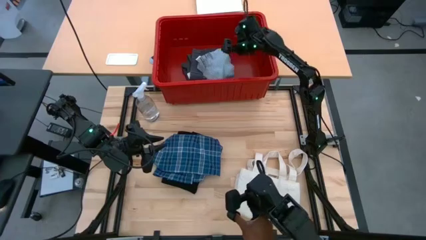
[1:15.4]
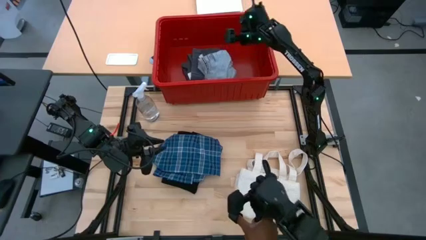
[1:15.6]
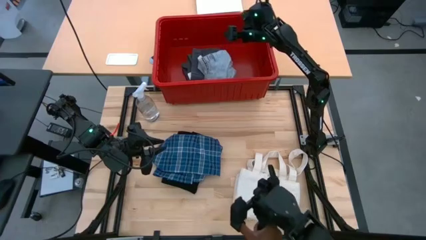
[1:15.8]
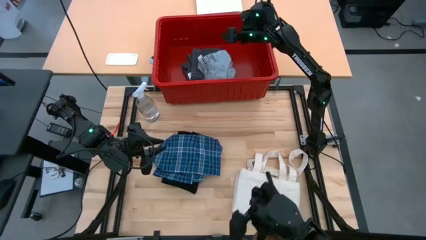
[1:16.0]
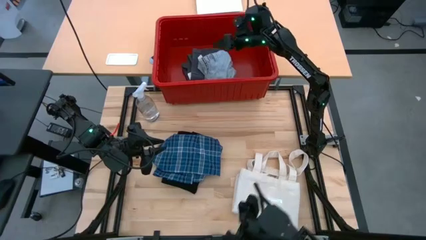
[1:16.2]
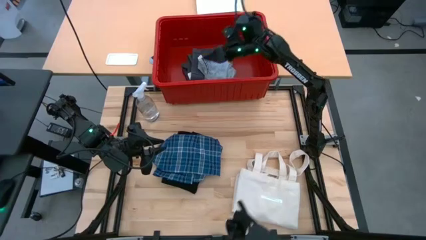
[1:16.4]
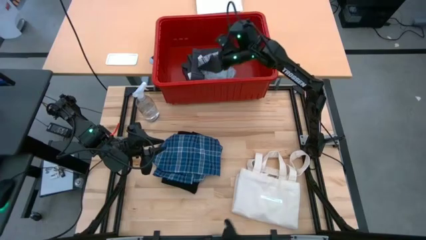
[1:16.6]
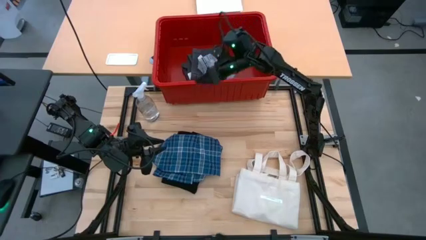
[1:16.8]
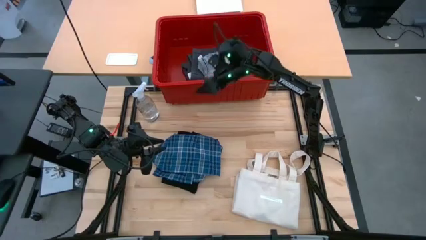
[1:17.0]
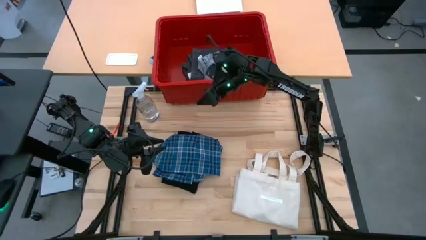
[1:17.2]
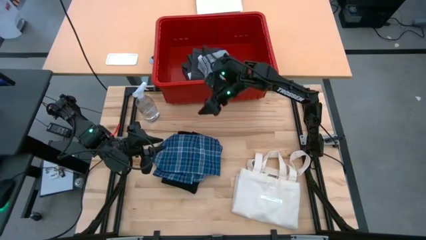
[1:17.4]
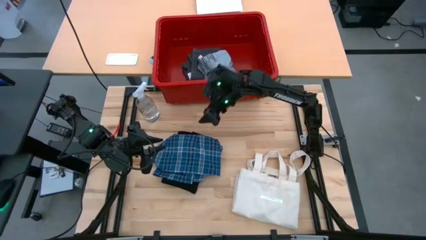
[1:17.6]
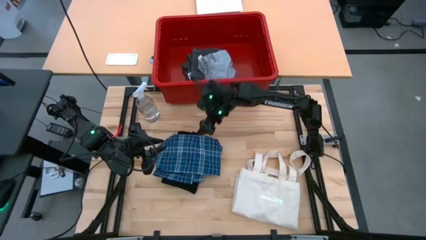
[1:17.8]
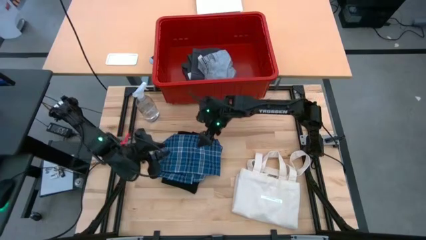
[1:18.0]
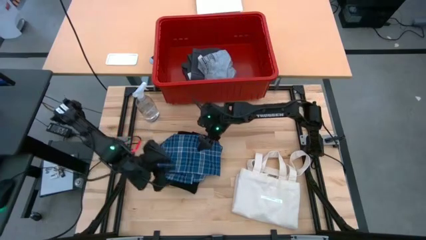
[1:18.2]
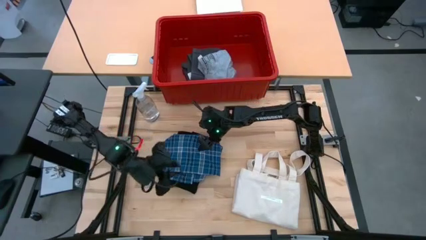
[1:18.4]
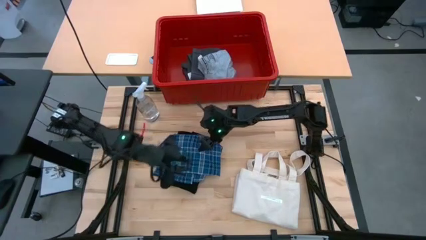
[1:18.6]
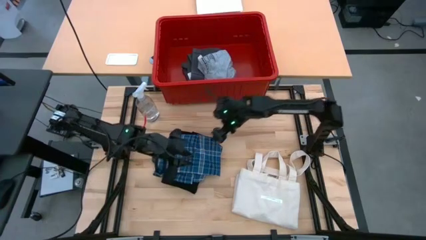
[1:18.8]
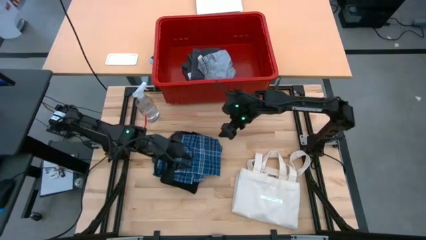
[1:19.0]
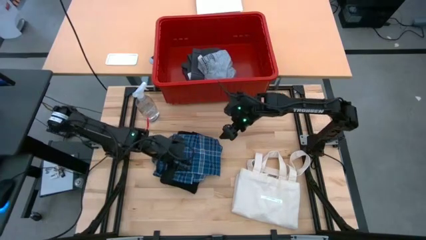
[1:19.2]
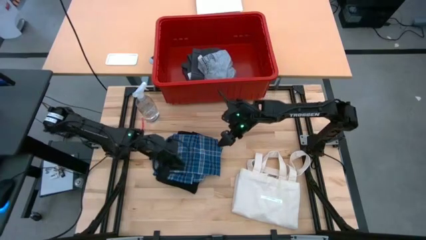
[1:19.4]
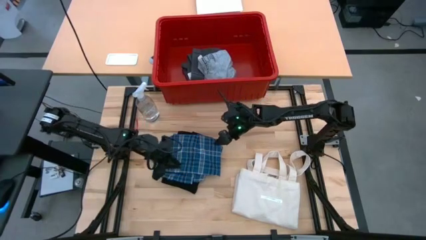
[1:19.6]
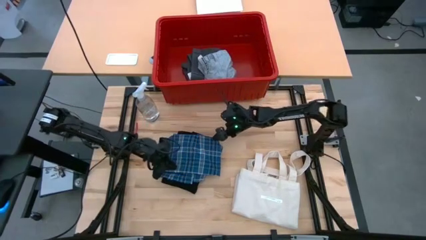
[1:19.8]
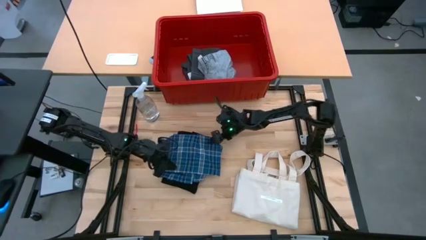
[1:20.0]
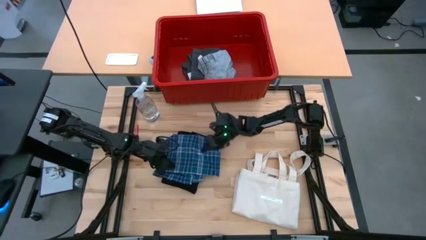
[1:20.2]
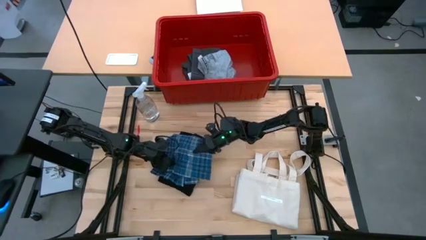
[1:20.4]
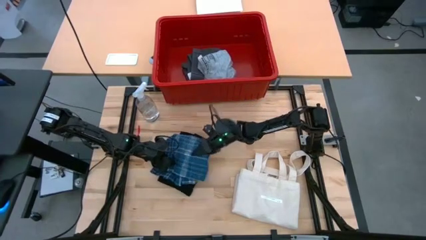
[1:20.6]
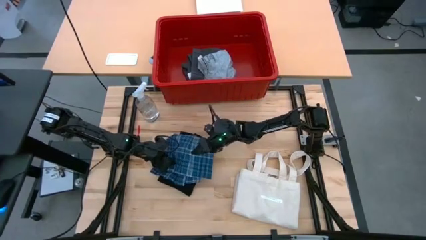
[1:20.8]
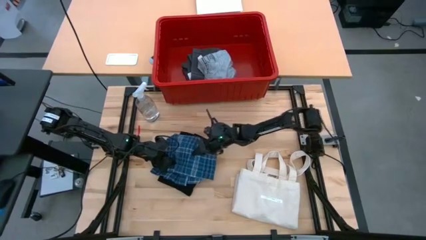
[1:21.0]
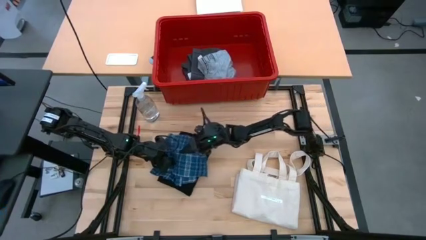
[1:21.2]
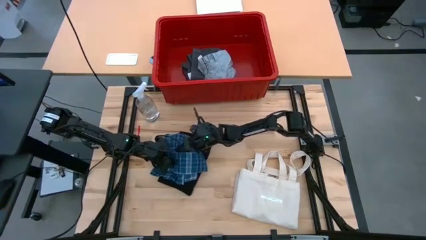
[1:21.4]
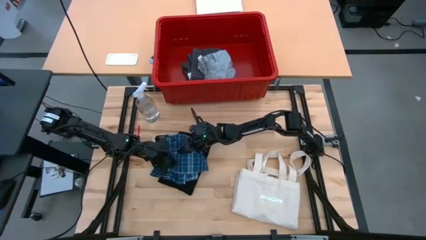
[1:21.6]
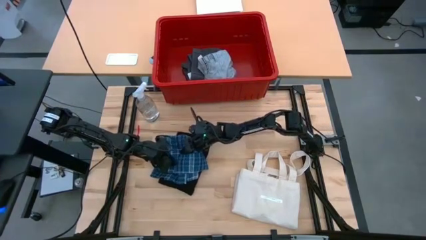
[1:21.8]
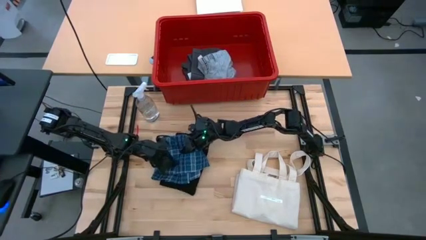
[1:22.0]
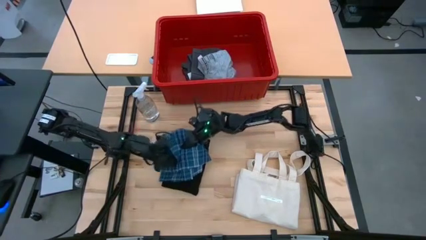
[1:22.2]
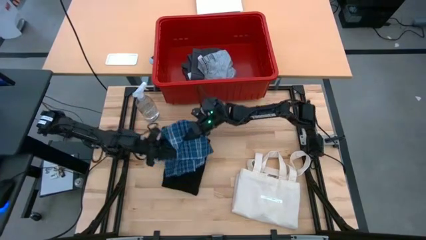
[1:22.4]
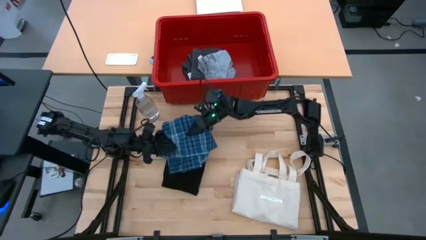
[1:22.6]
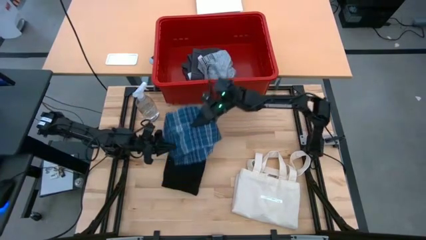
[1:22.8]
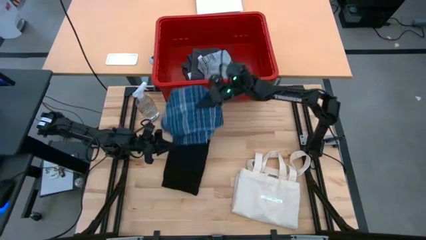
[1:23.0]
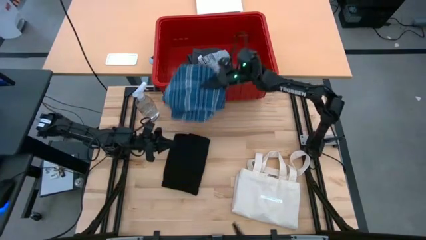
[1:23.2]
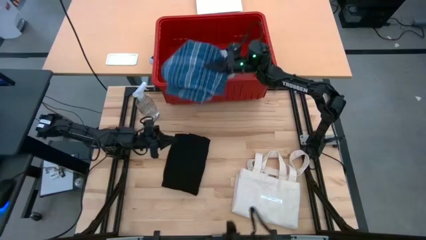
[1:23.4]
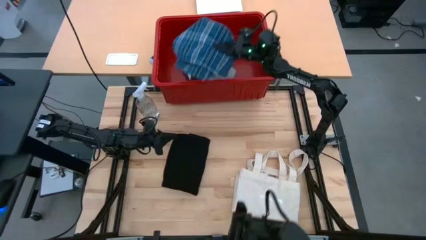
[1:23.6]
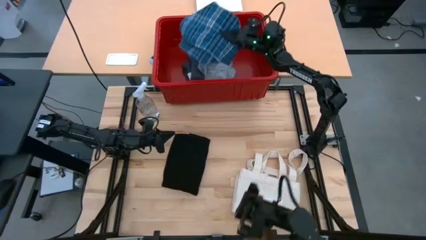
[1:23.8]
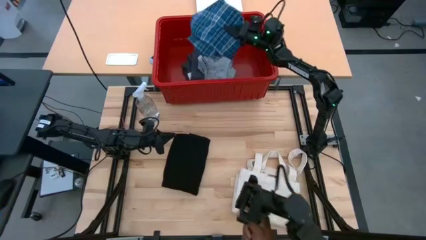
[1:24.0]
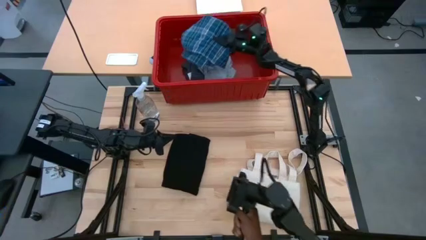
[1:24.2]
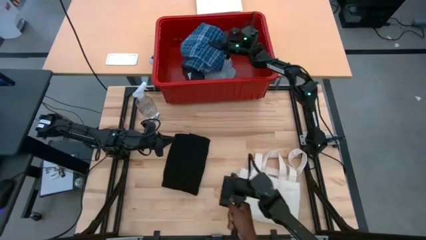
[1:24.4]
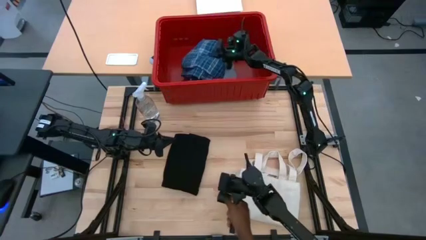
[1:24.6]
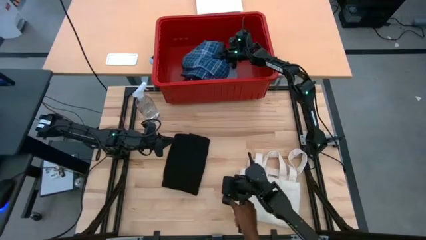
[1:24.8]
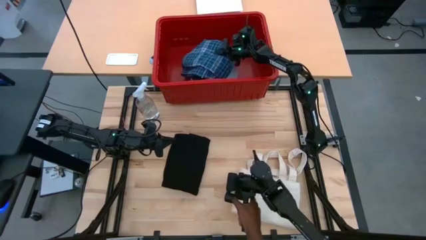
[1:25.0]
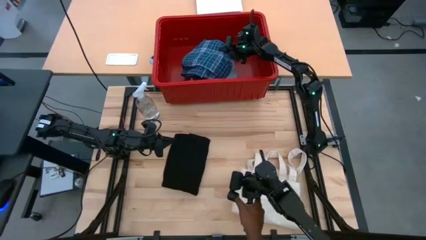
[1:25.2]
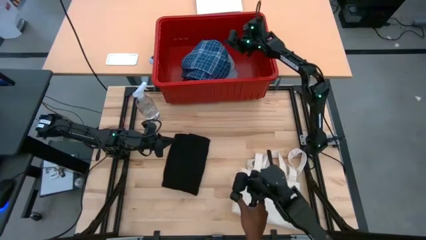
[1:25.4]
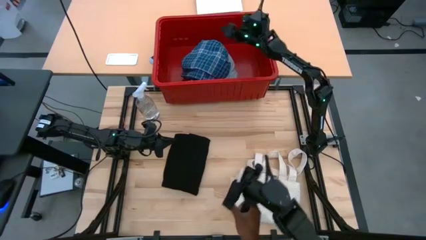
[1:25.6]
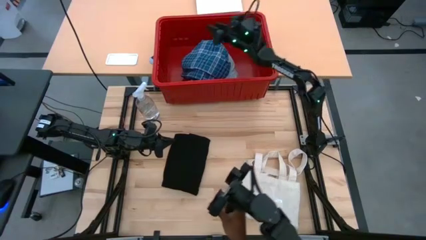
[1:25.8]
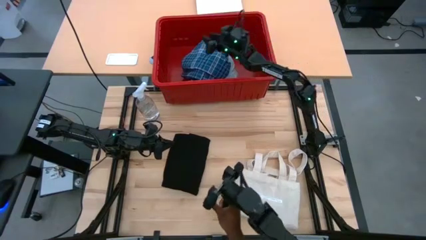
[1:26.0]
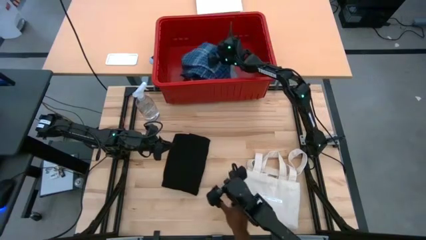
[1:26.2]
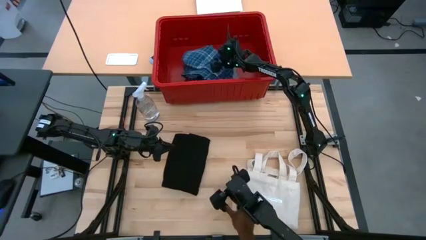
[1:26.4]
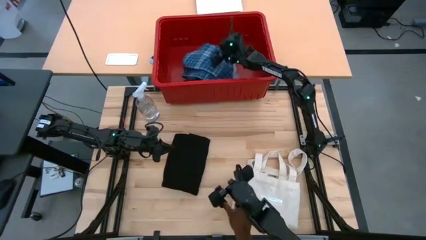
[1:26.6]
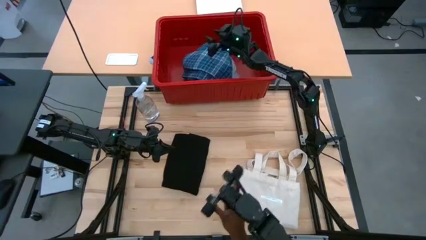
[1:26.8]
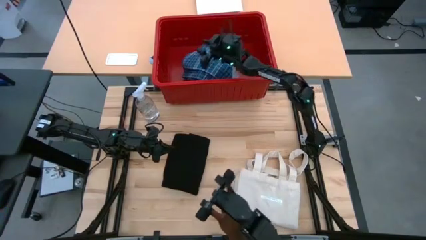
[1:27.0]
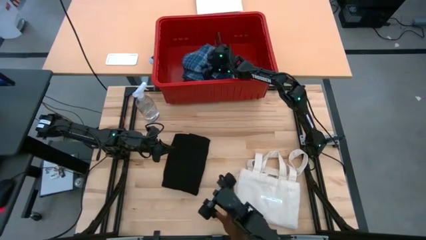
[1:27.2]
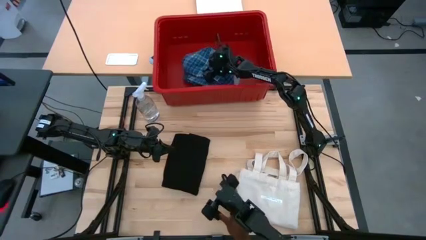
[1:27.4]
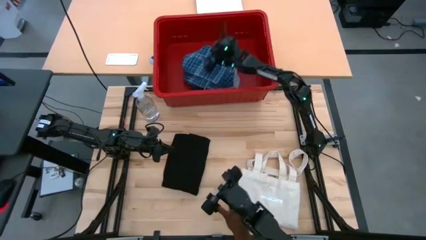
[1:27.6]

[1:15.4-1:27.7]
Task: Fold laundry
Put the blue checkered shirt into the red bin

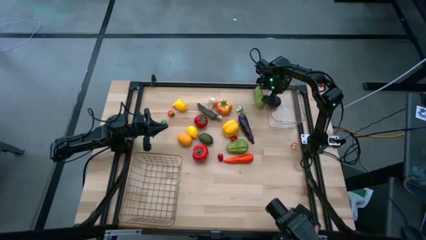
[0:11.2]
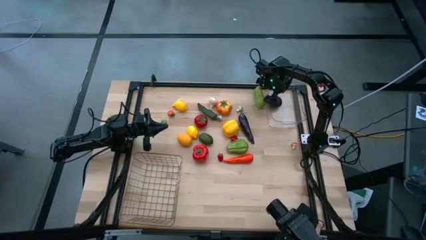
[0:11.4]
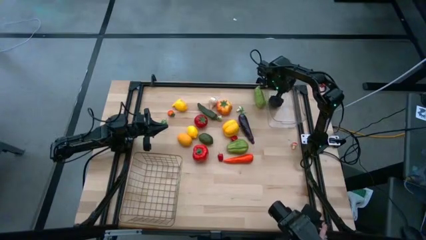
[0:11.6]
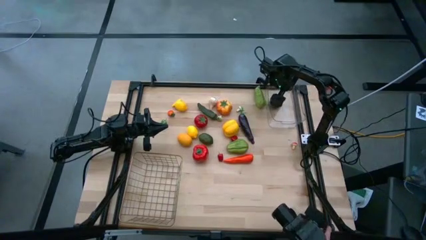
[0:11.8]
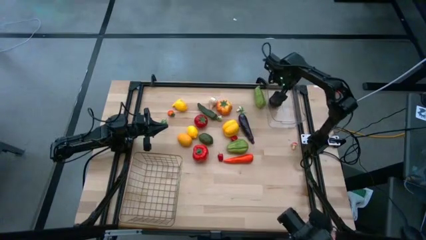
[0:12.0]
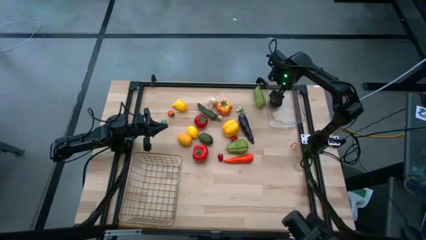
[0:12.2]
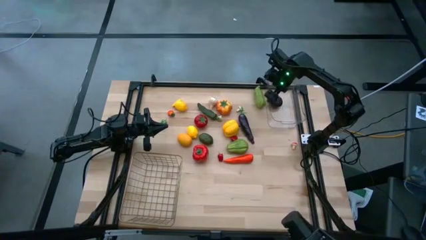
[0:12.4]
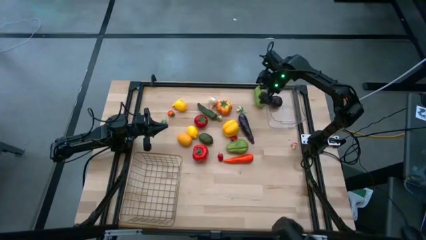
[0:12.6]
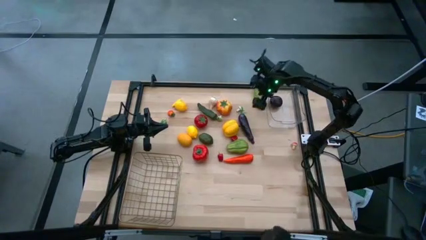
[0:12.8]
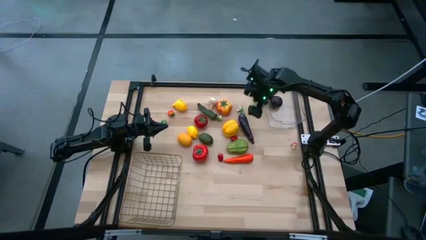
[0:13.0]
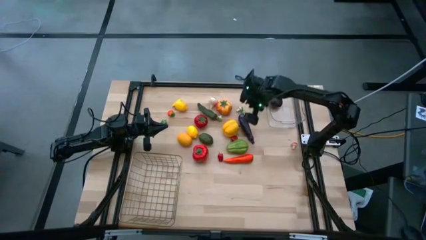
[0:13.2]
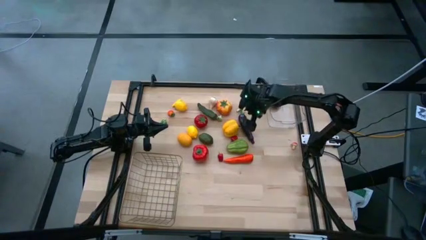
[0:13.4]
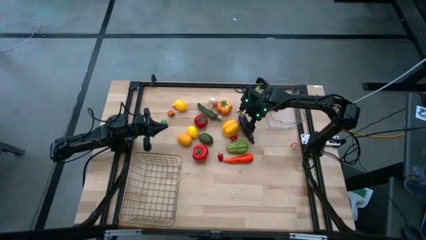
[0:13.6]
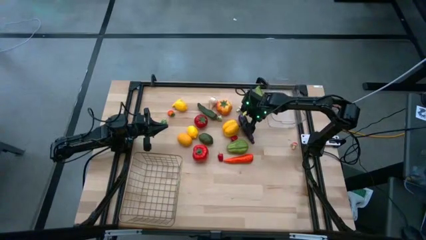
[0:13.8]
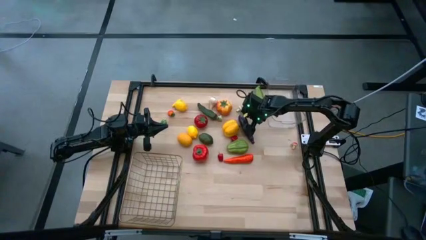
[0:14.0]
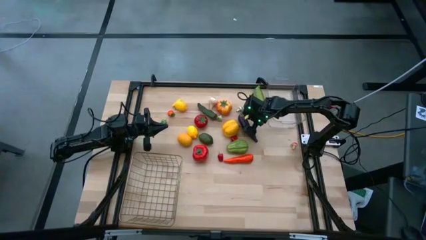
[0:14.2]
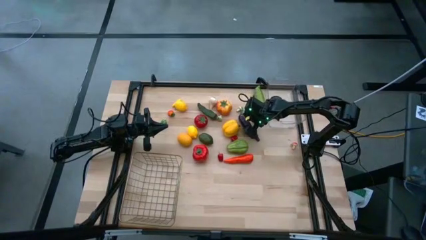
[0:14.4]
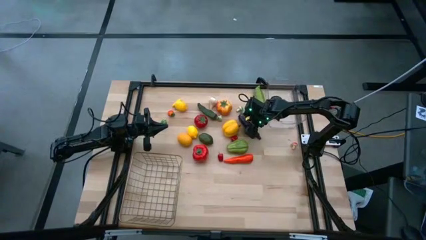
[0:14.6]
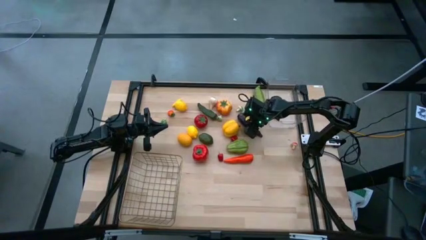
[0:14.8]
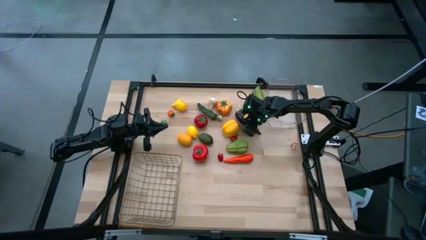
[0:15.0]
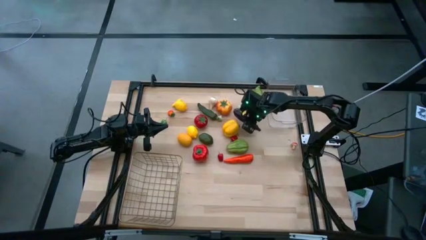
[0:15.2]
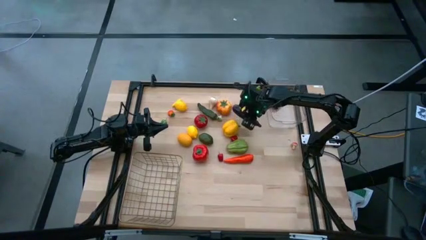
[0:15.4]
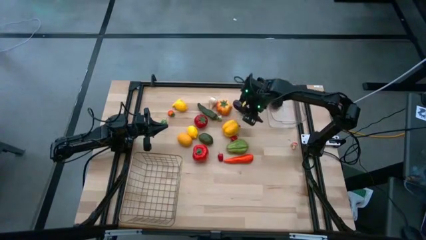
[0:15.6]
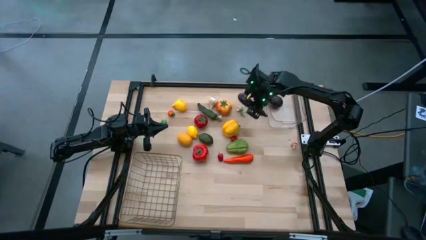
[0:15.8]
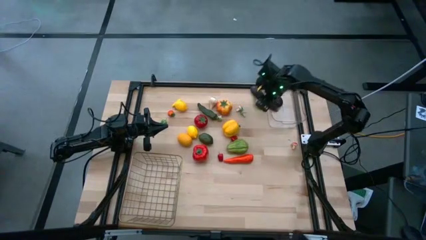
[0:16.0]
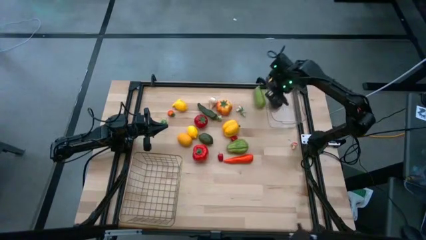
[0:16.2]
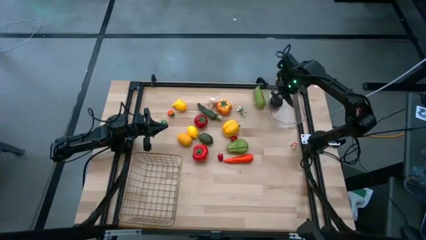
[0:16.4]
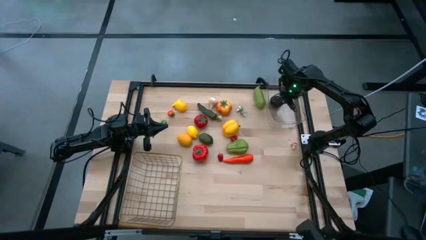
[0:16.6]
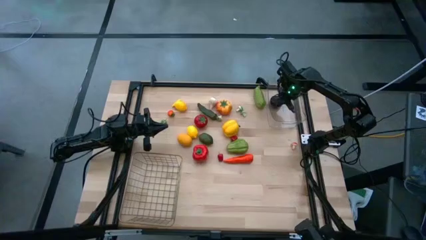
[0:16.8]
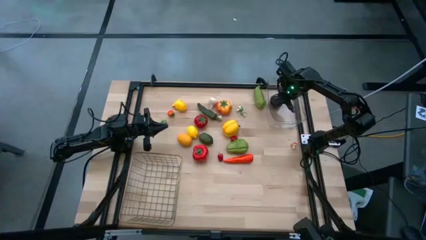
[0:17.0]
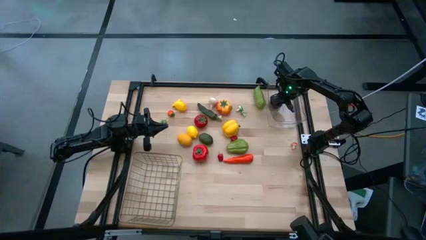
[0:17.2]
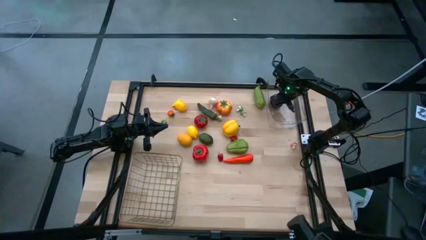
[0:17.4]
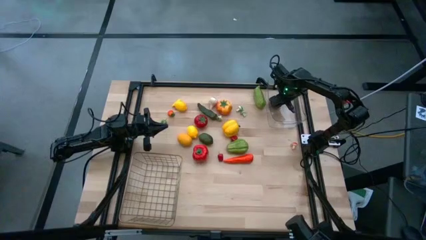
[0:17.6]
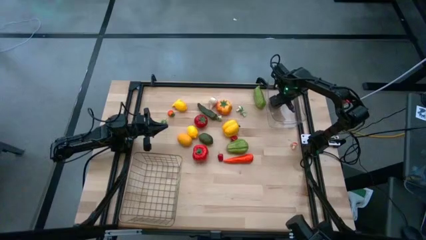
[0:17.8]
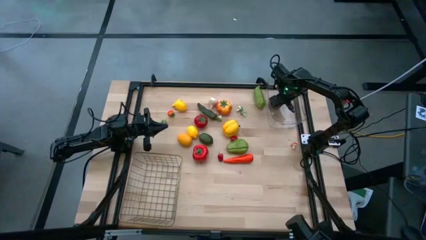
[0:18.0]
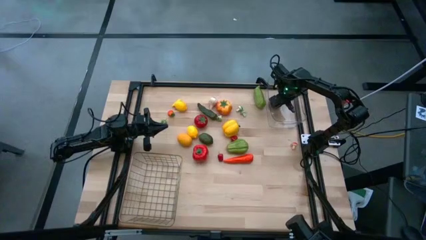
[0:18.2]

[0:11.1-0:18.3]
Task: Sort produce into baskets
Put the purple eggplant into the transparent bin
